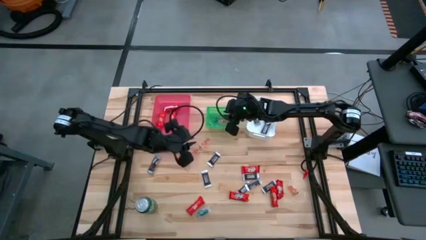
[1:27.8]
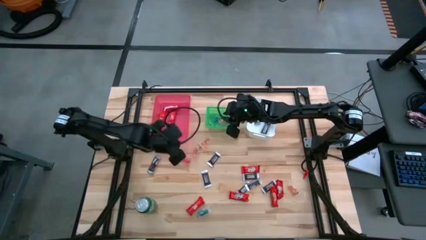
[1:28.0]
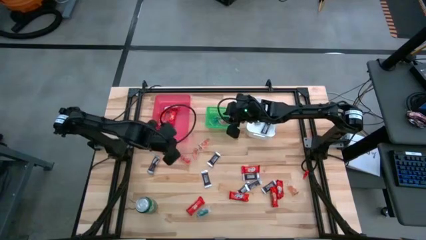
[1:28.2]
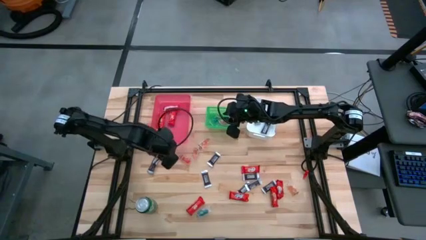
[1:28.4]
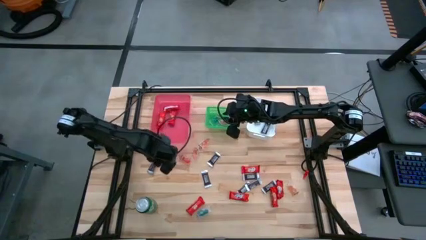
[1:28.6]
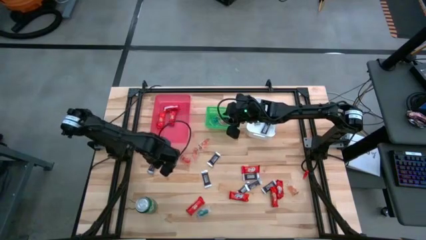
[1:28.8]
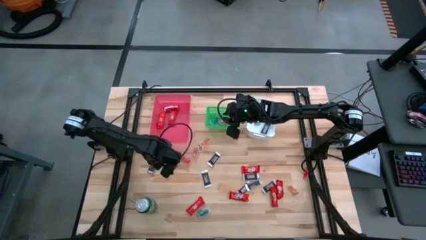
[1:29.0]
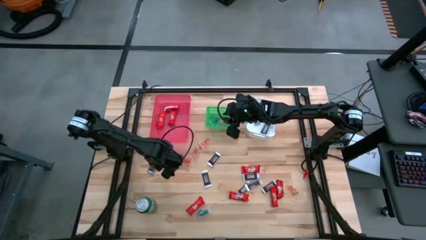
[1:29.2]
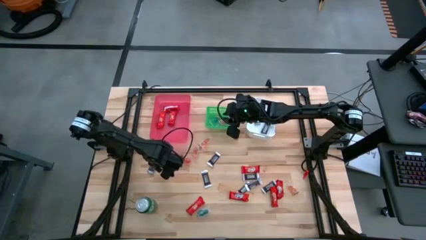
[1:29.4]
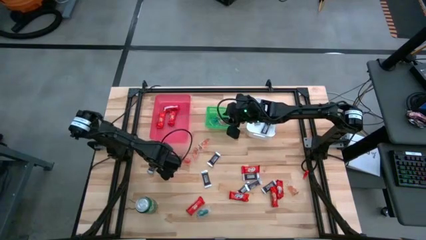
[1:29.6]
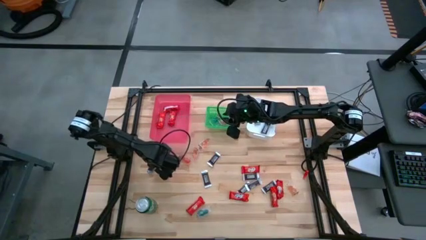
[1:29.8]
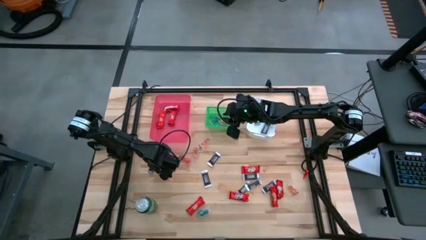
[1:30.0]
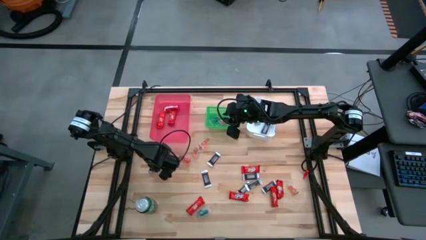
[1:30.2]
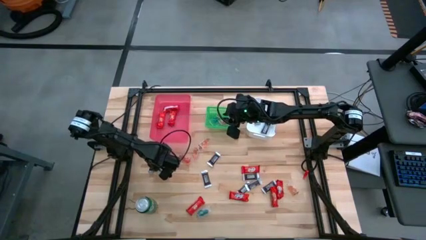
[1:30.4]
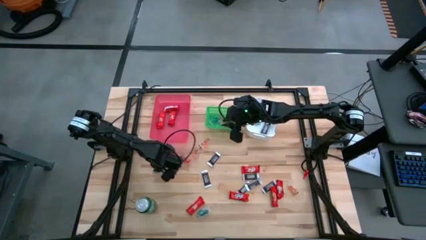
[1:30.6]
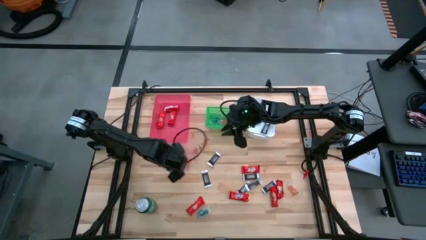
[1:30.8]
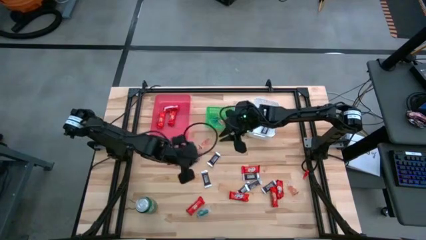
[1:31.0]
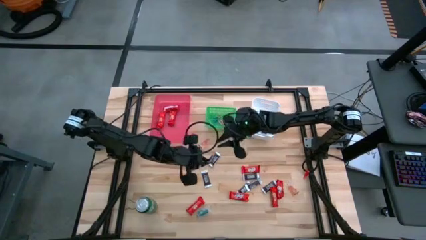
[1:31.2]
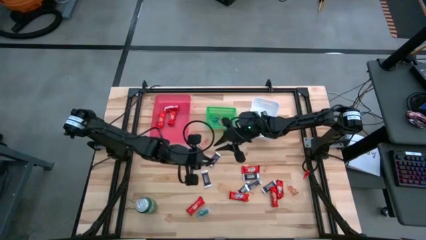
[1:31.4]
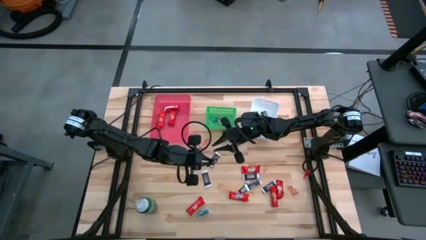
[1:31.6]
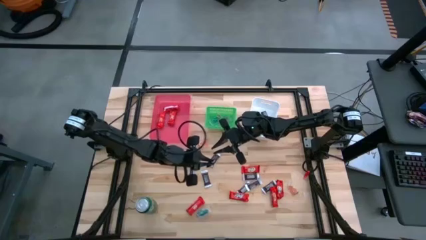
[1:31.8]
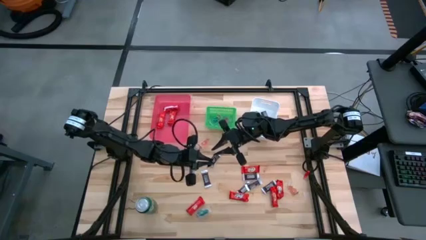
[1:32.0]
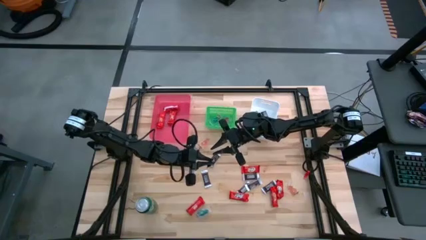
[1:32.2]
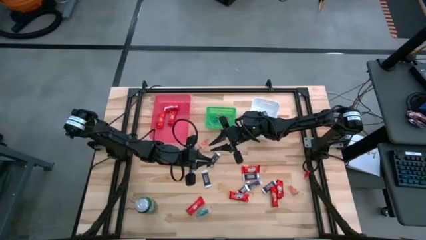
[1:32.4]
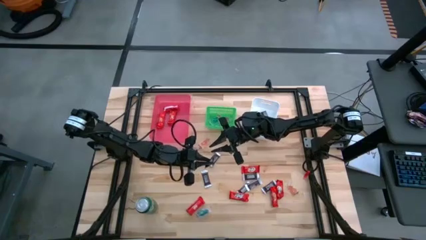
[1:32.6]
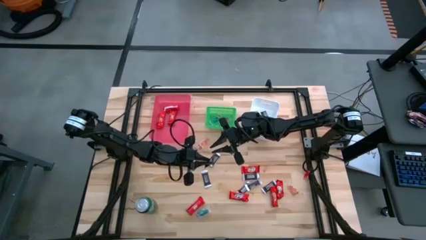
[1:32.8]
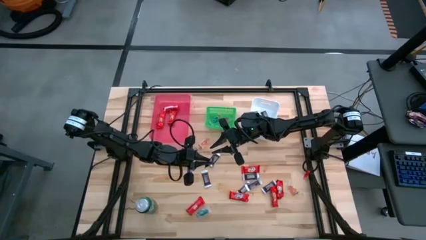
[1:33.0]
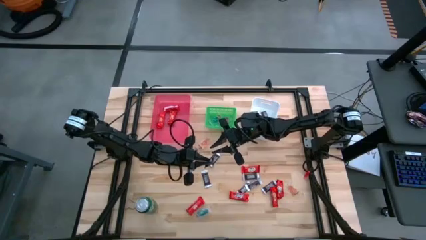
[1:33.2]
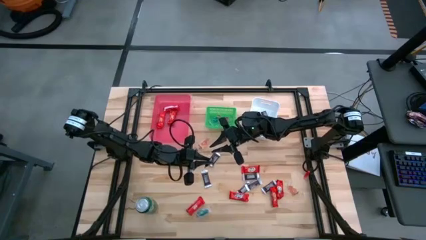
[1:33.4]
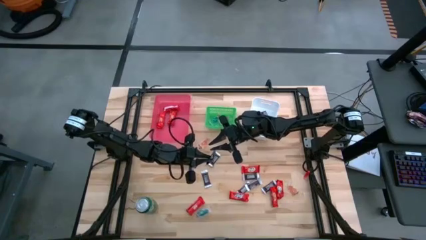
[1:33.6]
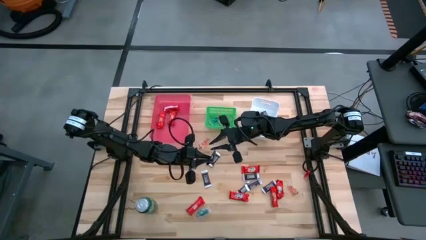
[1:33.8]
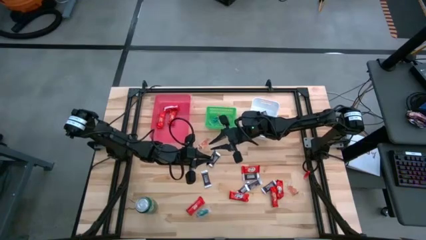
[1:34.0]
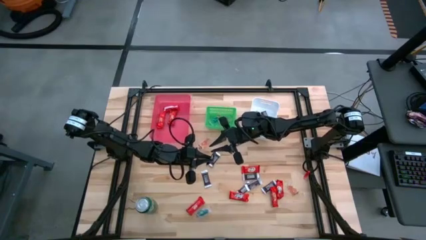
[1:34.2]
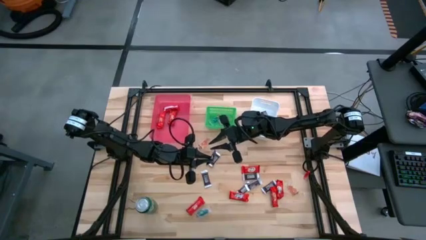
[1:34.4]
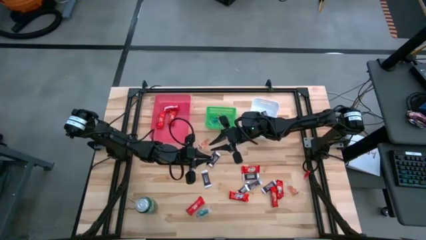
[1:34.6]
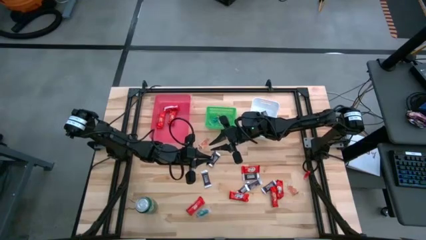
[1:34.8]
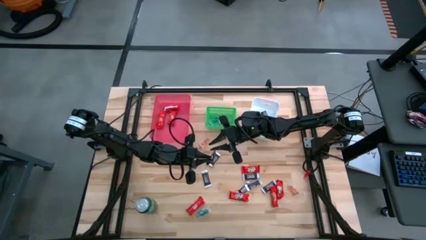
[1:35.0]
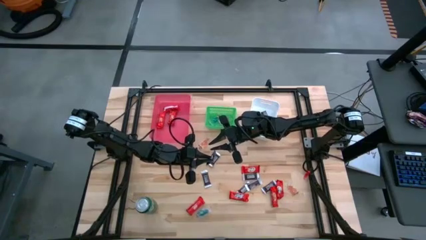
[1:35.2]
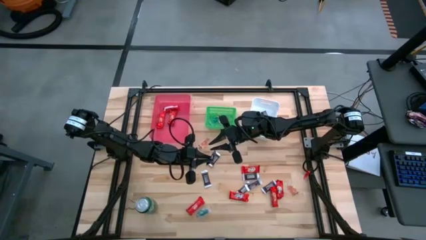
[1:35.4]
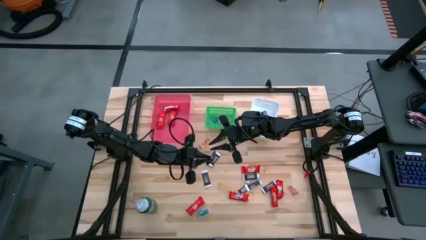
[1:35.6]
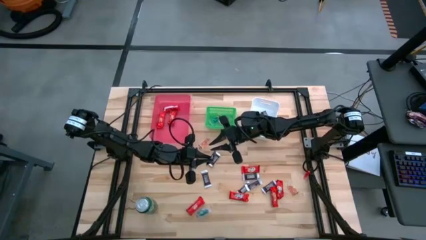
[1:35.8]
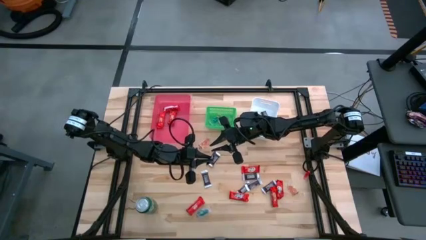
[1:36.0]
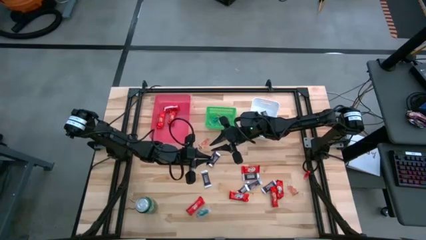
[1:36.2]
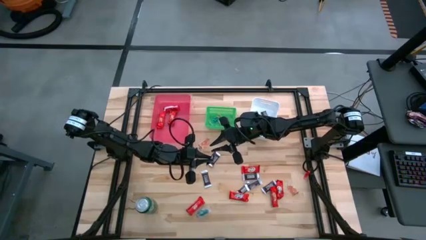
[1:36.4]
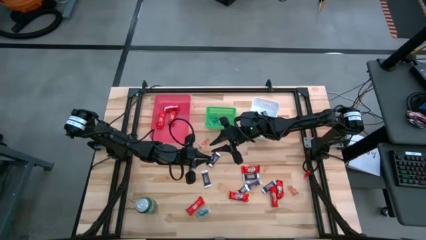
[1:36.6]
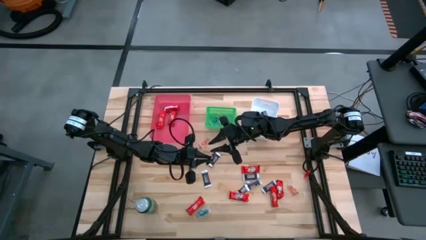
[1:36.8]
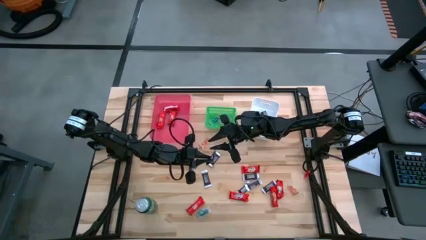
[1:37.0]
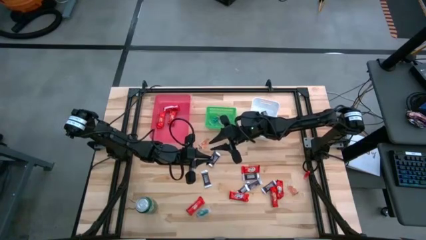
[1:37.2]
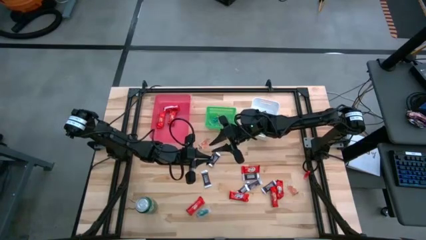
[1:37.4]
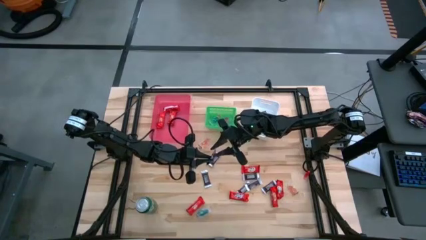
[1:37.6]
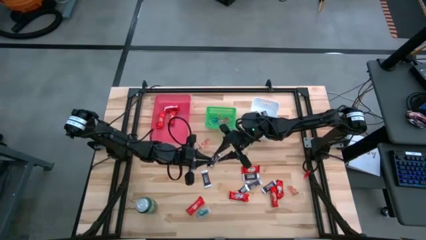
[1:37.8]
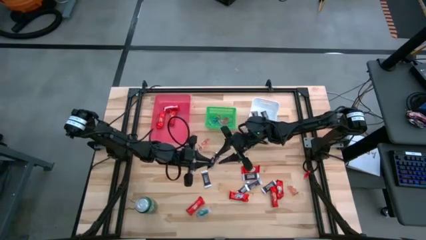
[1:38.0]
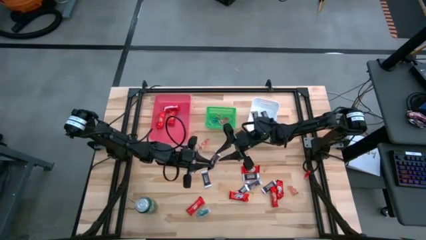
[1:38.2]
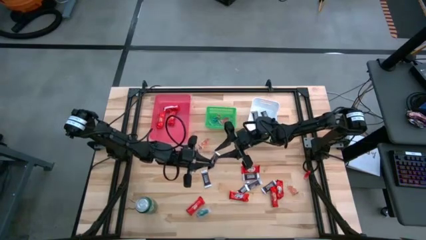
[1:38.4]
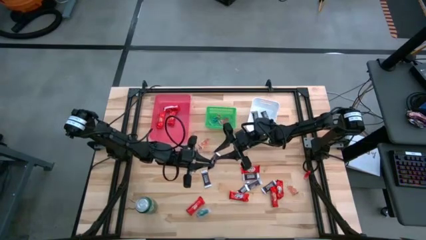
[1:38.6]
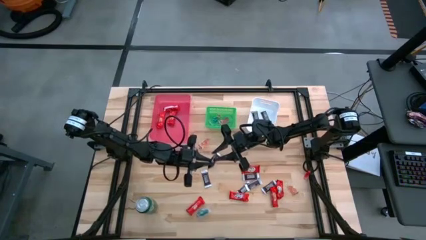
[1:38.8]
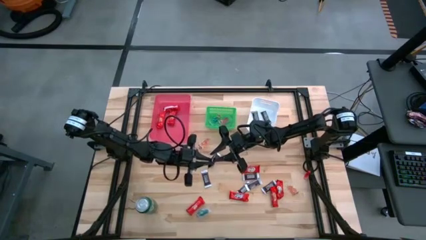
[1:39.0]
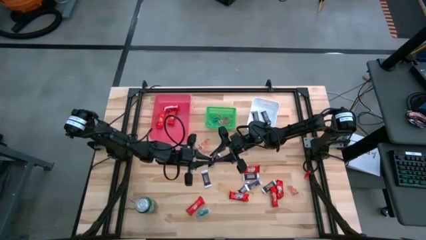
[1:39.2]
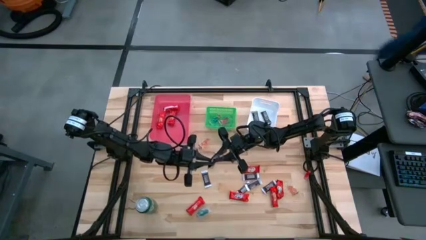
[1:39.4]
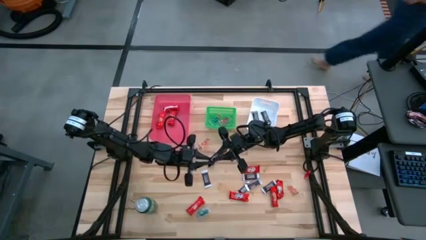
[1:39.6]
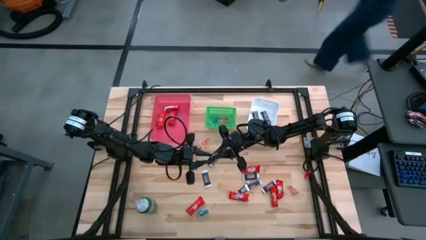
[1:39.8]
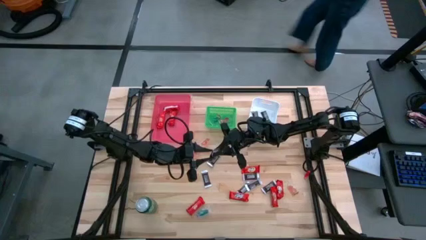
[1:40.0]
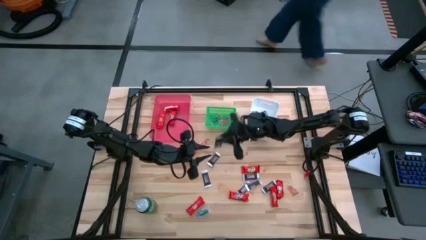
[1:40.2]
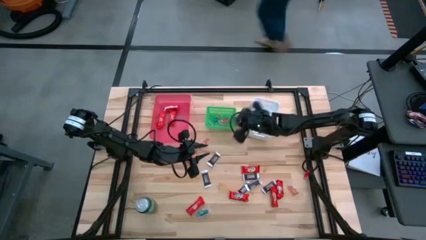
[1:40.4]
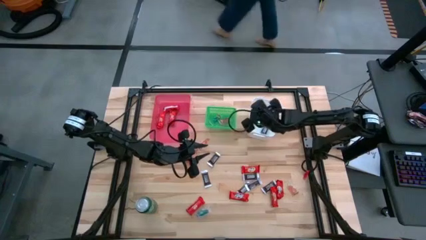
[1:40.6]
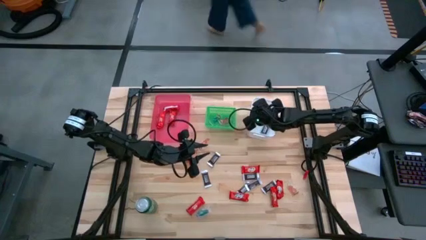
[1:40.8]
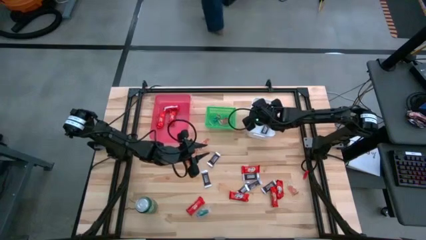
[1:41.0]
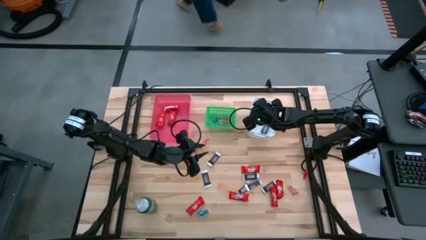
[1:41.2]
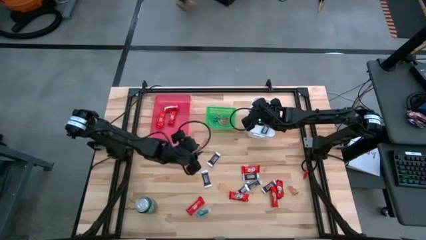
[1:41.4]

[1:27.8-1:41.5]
Task: Sort candy
Put the brown chocolate bar into the white bin

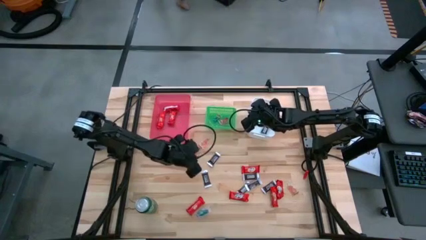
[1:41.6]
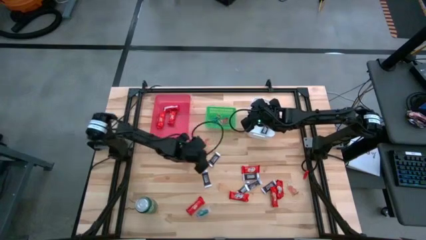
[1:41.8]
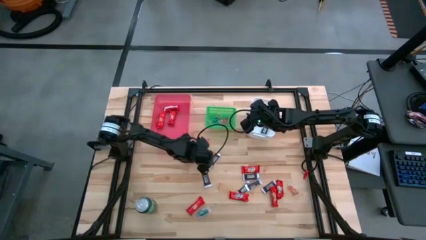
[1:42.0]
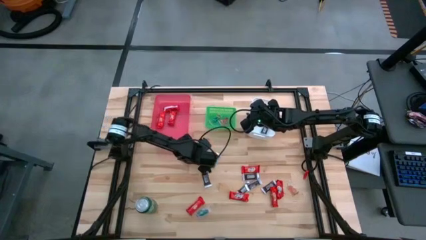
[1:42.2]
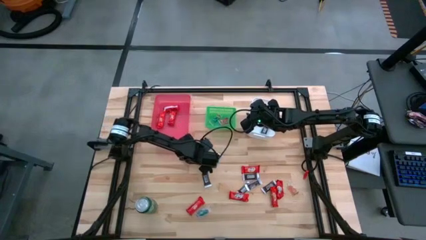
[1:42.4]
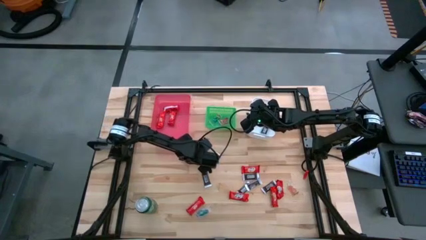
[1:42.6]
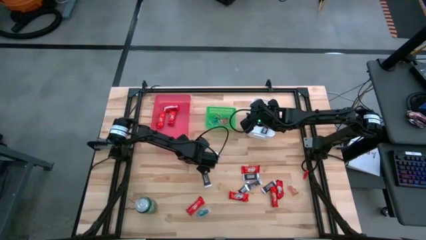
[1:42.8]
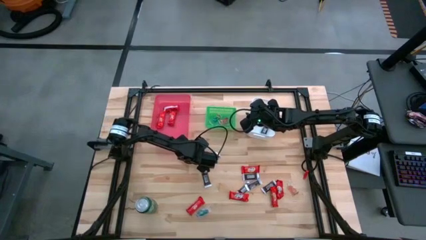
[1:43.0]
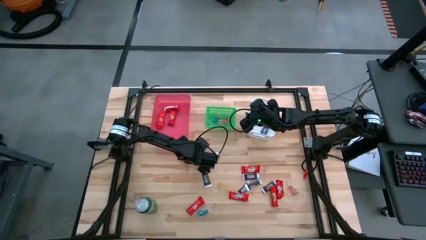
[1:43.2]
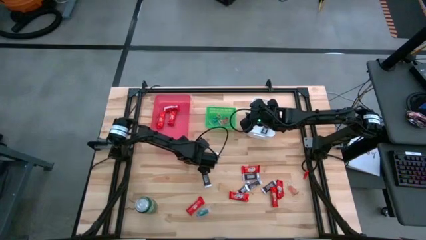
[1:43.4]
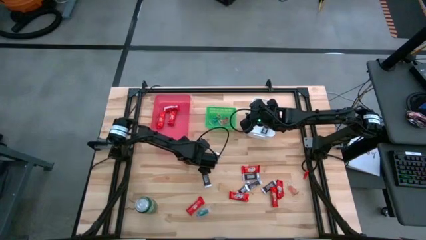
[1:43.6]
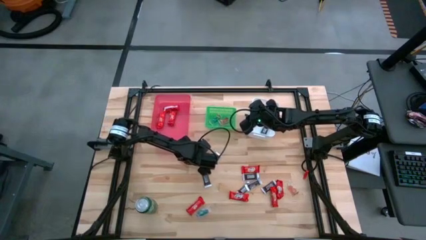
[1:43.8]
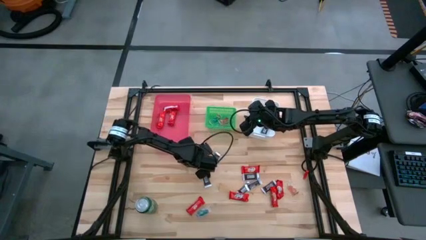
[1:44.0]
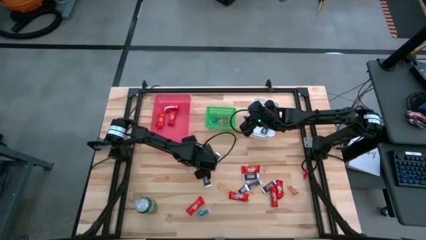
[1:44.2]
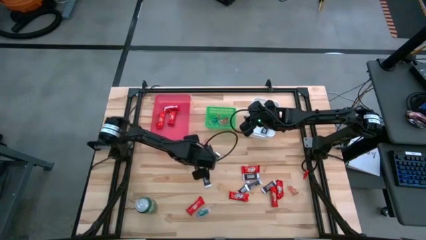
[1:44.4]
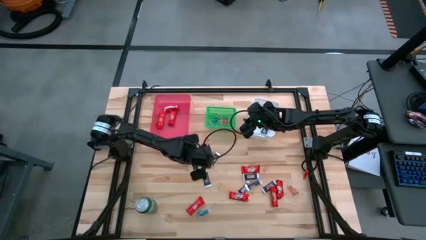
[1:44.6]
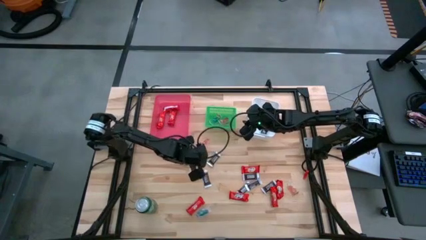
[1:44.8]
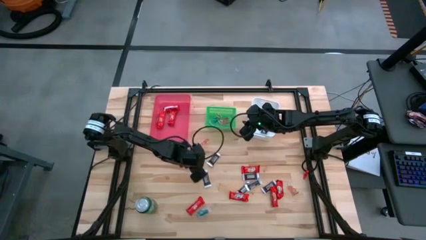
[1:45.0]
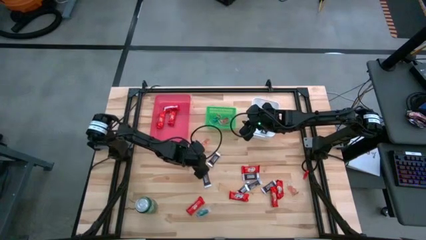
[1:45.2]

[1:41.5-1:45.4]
Put the orange gummy into the green bin
